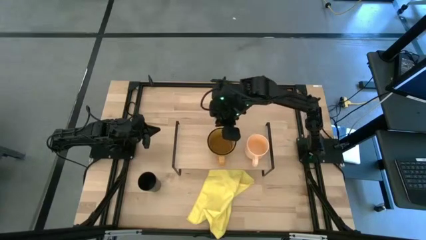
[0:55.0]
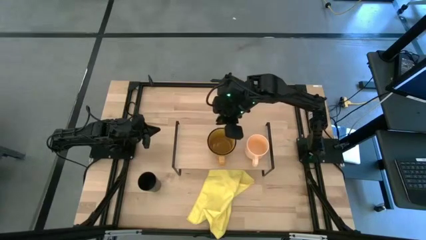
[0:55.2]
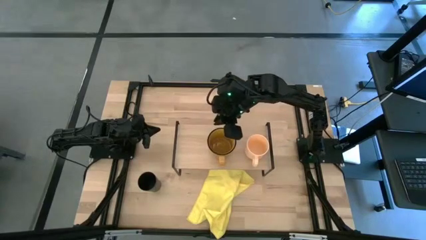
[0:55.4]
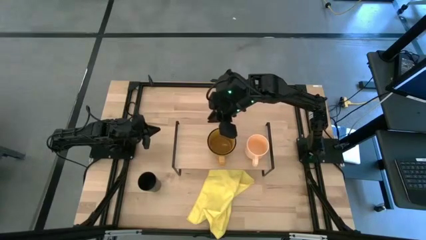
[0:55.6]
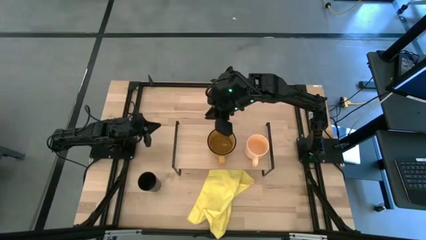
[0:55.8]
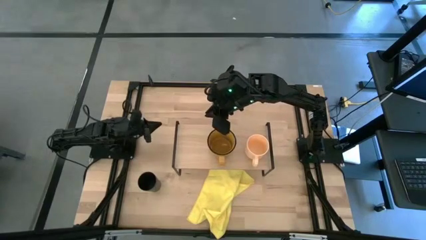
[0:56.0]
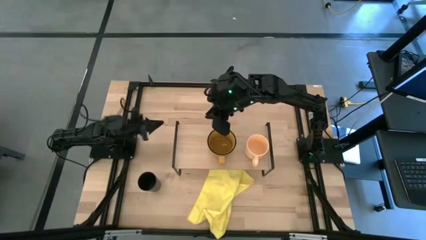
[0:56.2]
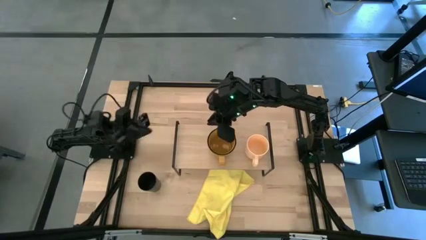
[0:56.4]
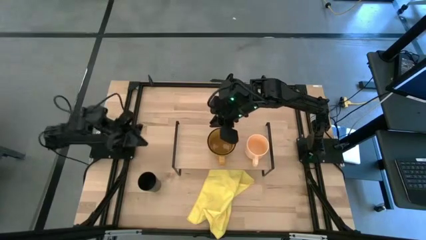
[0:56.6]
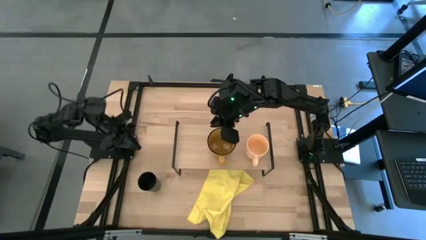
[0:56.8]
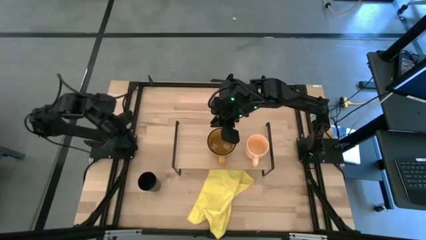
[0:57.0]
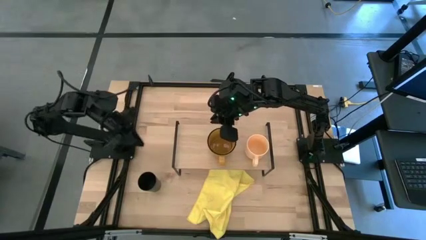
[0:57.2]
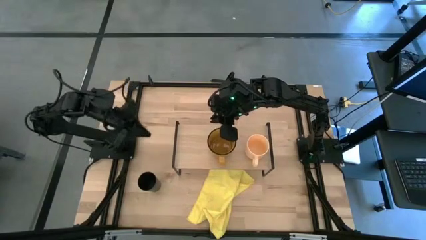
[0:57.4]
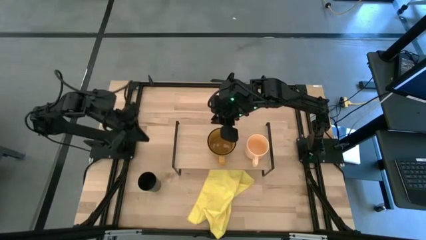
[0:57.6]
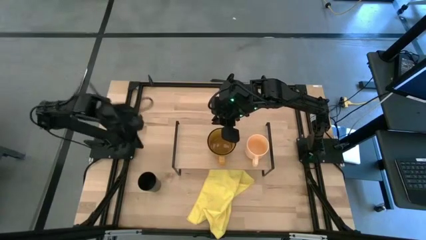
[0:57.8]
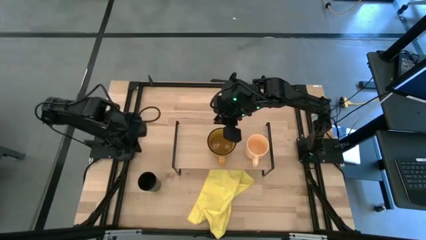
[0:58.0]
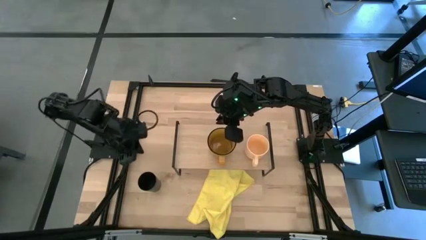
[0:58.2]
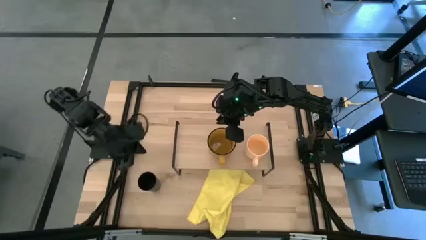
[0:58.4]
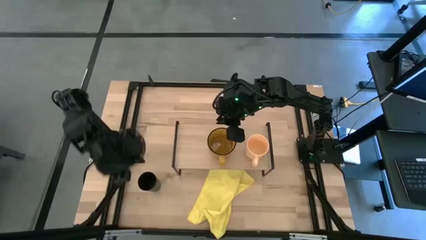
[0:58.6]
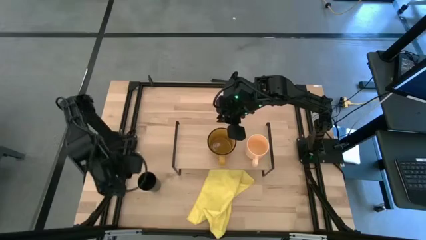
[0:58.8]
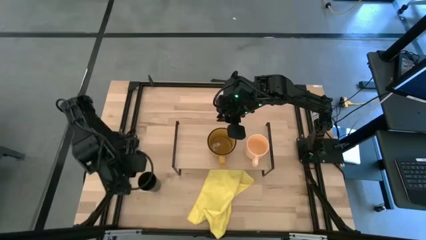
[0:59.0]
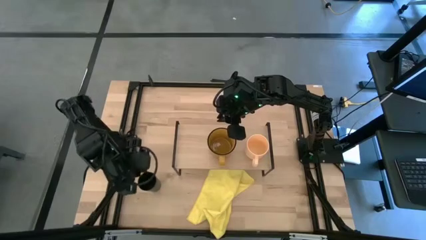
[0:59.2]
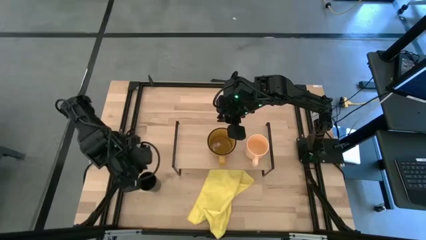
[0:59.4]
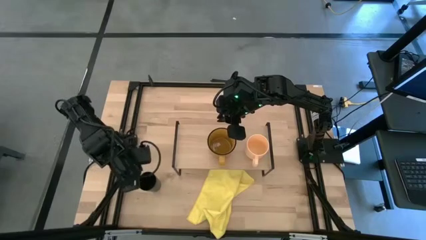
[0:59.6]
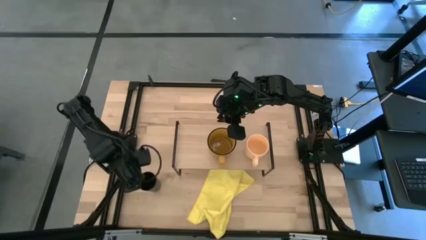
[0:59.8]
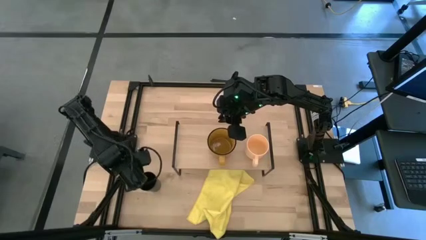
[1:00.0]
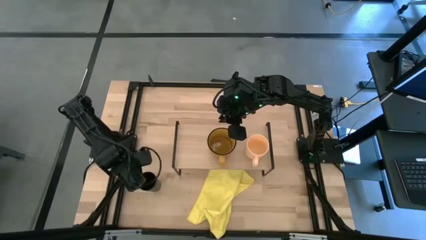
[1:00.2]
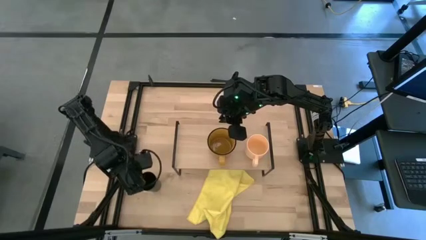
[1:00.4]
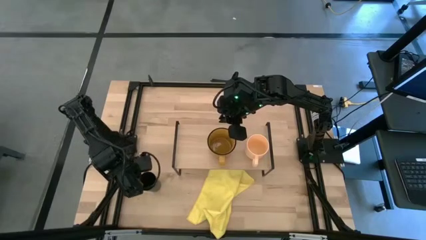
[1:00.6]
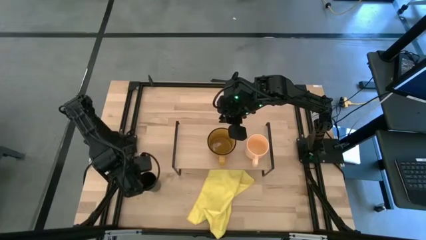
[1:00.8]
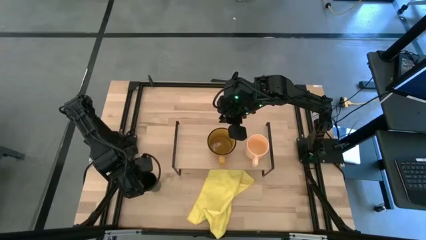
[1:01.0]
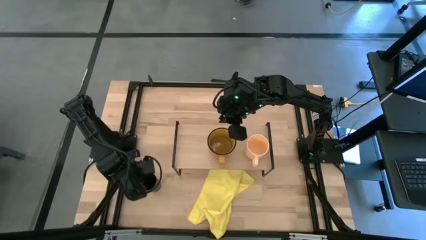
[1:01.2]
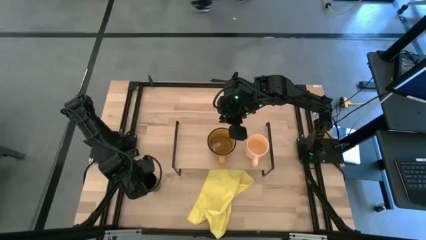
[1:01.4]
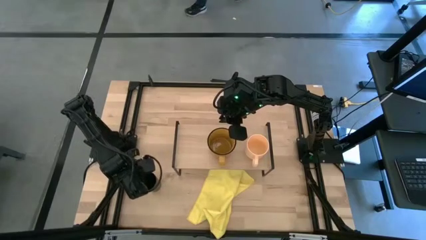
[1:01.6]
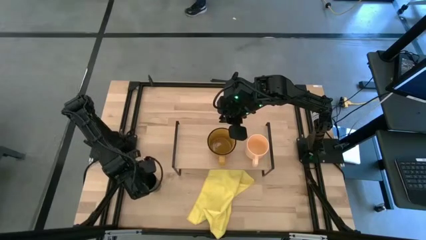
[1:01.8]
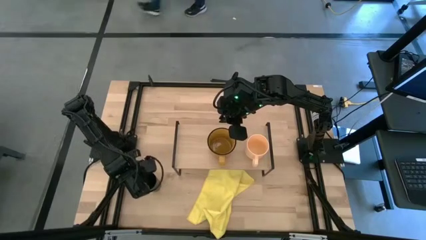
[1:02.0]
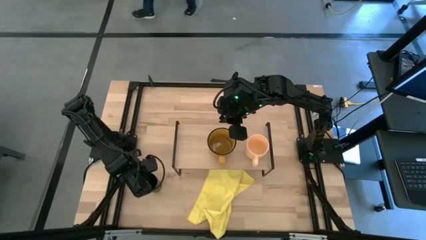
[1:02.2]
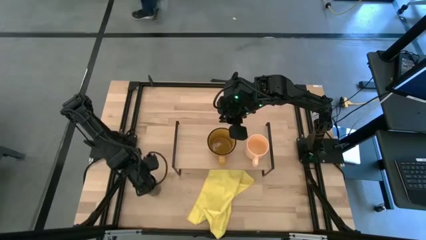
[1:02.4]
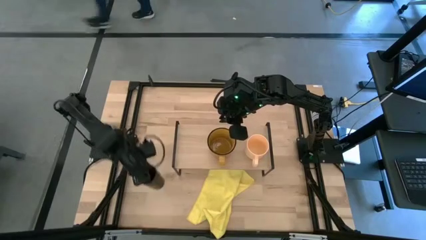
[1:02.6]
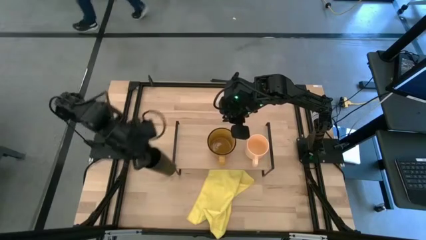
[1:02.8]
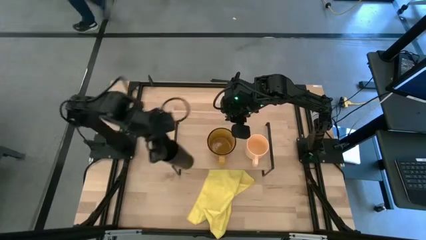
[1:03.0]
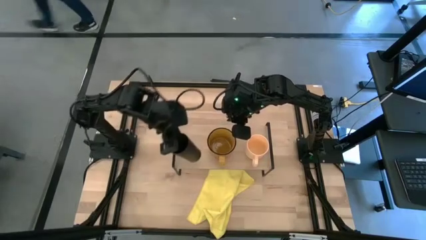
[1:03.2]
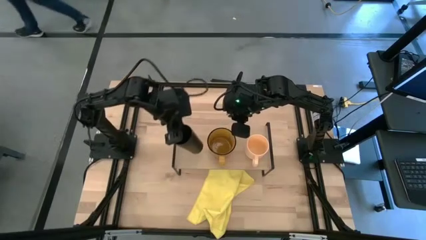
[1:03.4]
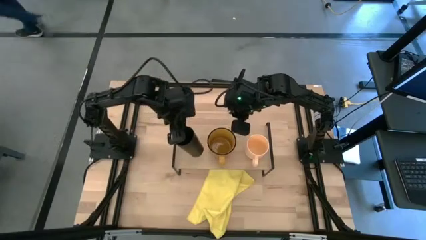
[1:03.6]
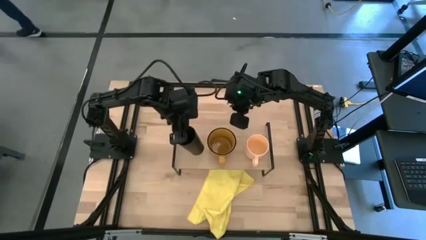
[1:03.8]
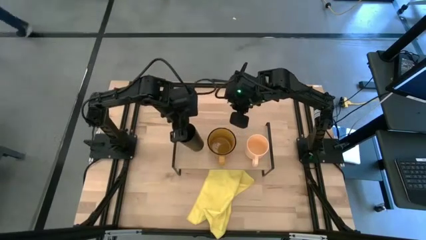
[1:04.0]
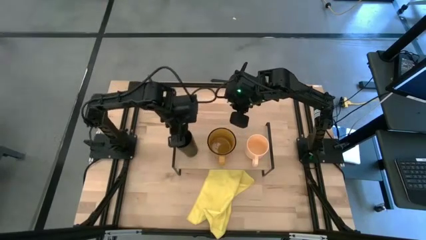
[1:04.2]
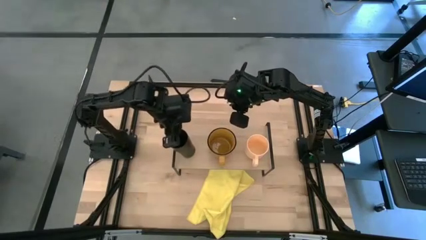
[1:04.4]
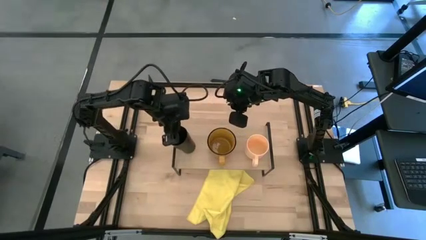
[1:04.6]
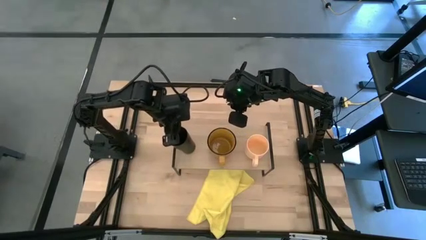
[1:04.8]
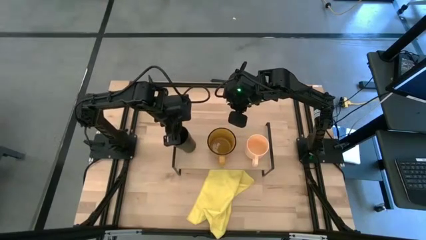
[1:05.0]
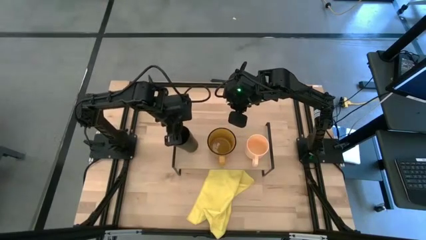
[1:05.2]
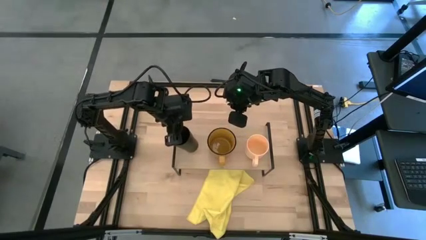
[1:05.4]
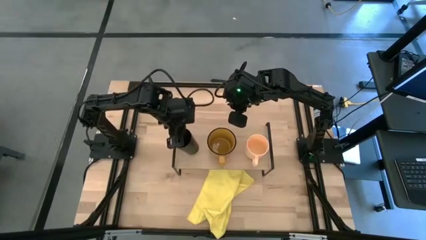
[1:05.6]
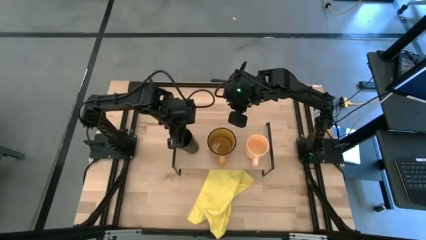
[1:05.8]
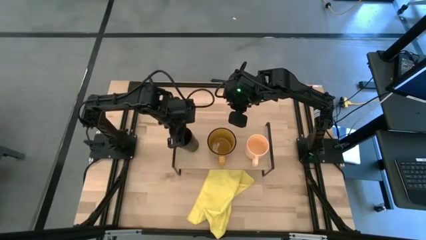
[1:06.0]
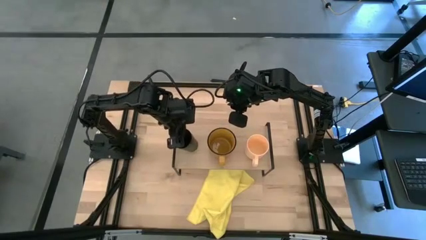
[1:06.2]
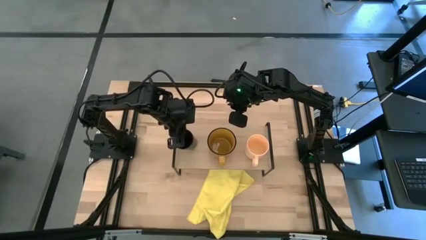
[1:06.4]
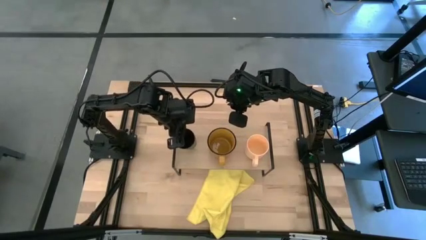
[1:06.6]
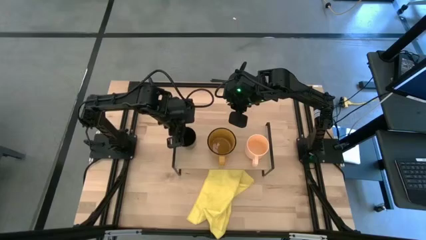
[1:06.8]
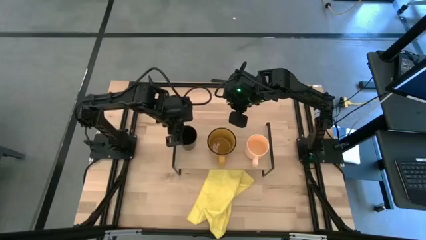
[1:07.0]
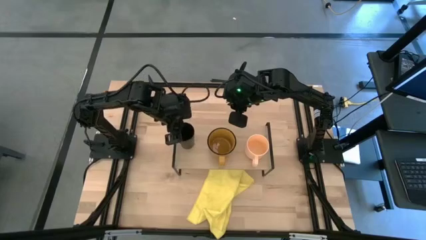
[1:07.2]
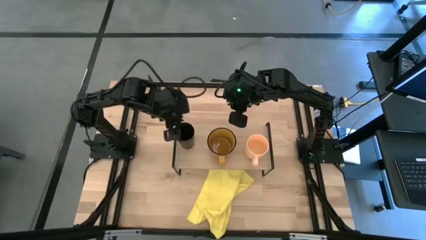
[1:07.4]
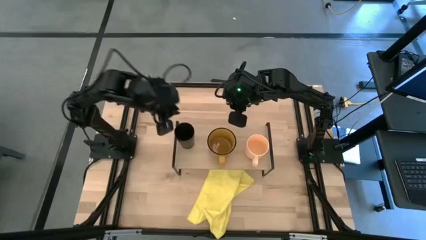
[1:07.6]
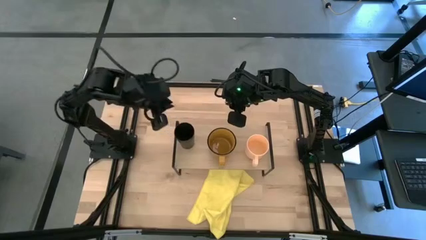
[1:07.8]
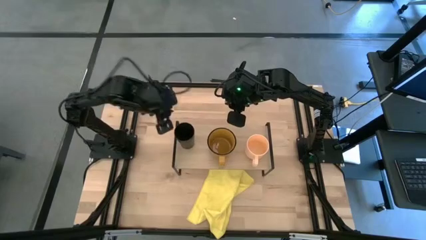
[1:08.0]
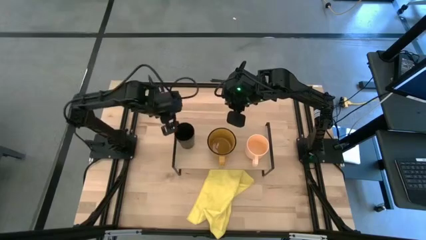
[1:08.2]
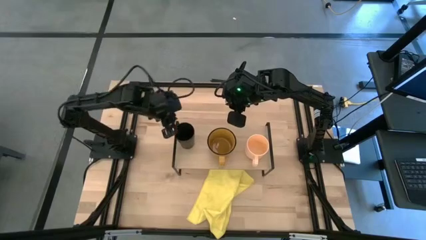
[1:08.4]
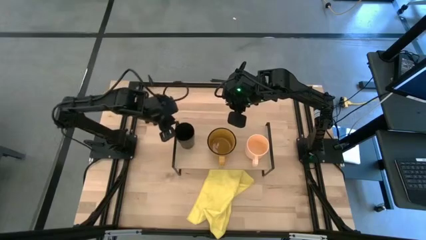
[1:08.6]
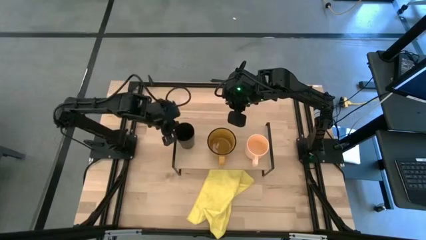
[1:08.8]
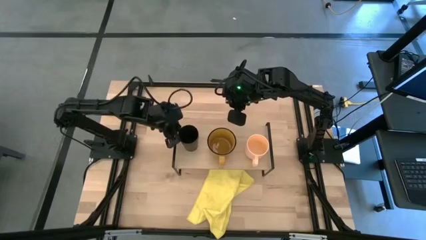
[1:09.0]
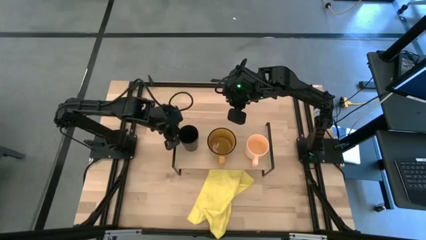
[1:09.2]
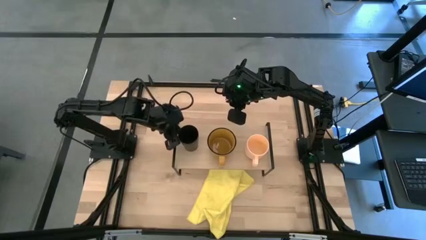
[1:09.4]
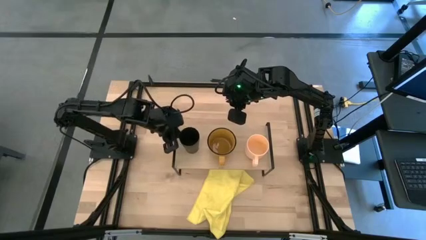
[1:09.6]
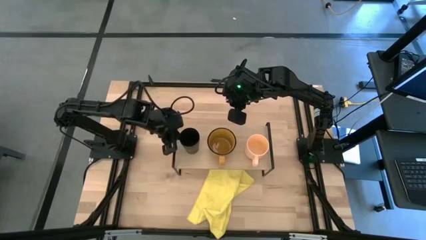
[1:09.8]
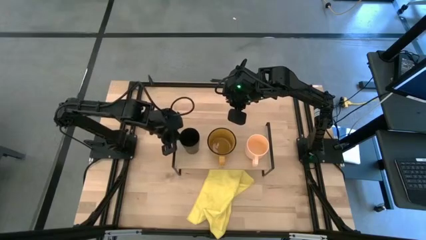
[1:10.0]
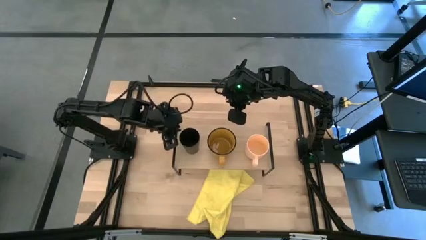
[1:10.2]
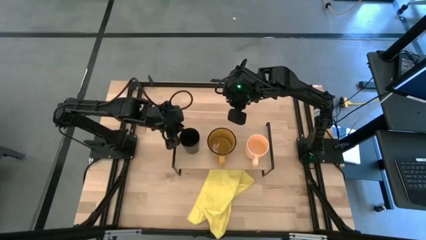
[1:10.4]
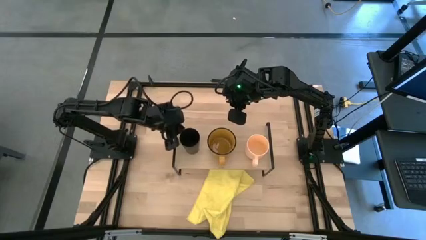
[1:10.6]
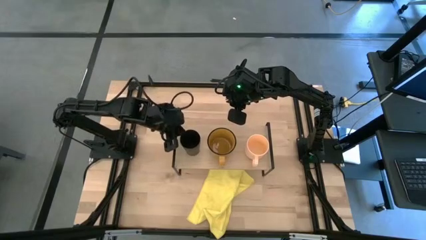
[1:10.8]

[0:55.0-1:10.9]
Task: Stack small to large cups/mugs on shelf
Put the black cup on the shelf

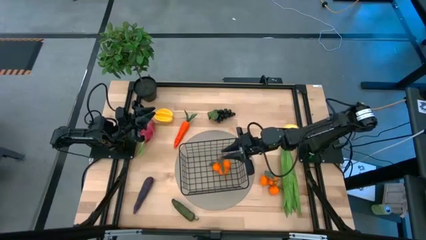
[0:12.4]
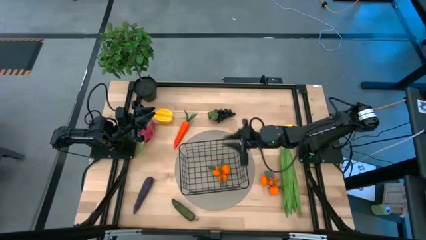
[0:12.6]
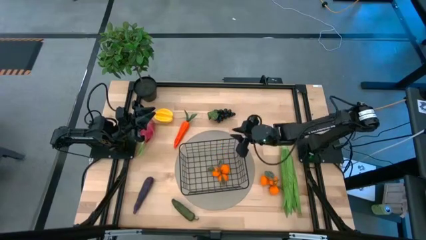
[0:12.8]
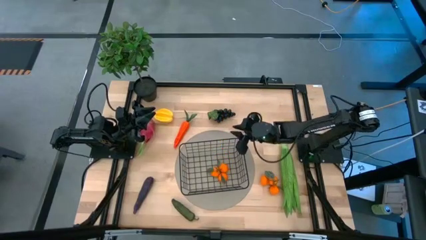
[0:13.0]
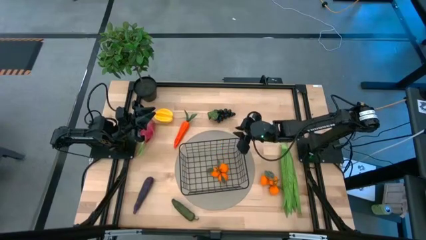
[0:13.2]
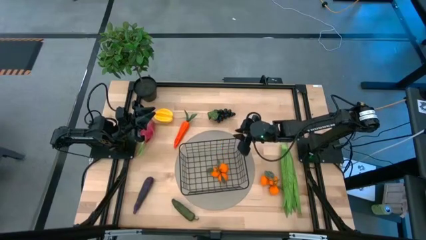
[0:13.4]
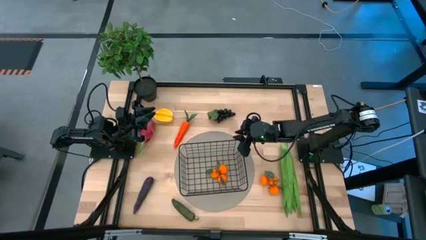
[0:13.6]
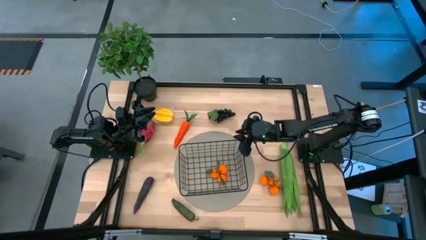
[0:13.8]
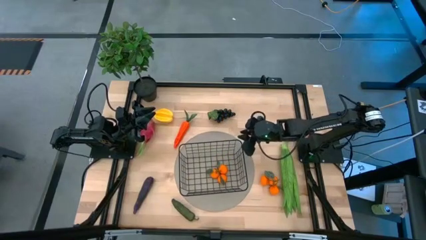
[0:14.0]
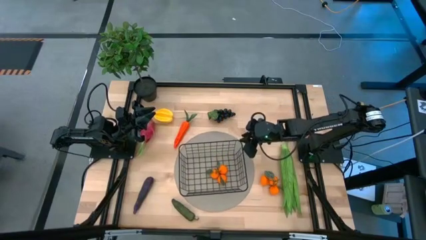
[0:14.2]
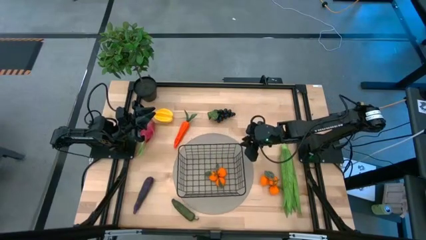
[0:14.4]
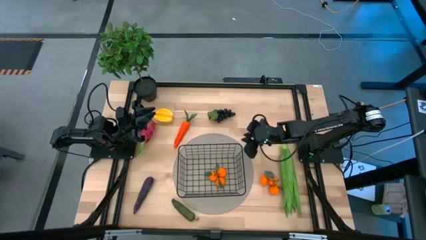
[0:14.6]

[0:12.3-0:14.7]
Task: Build produce basket
Adjust the black basket
